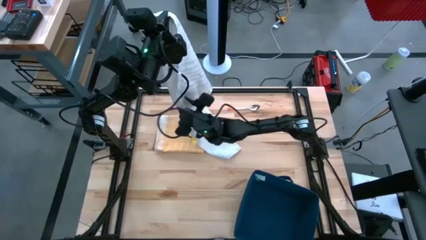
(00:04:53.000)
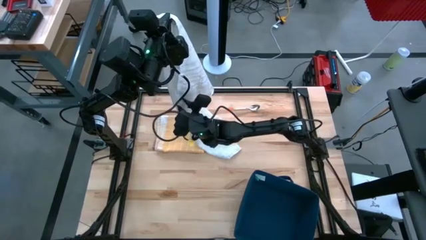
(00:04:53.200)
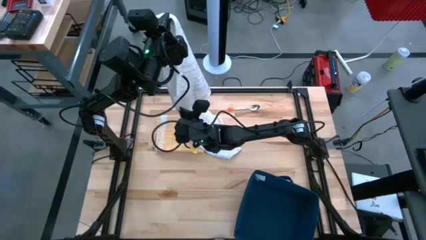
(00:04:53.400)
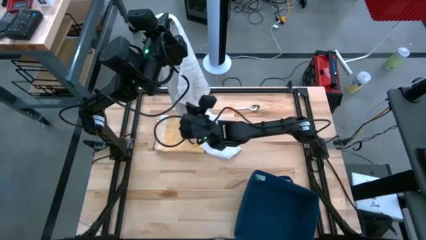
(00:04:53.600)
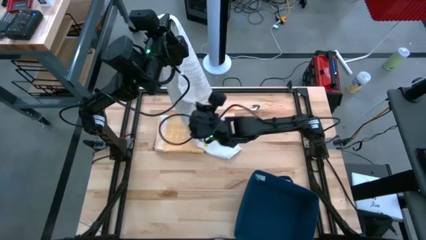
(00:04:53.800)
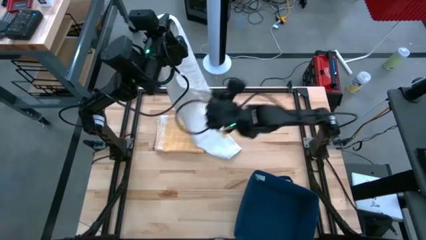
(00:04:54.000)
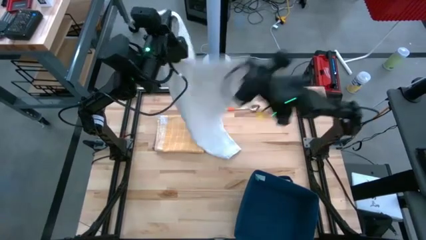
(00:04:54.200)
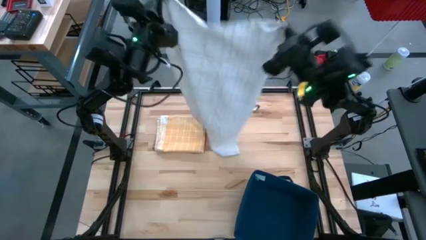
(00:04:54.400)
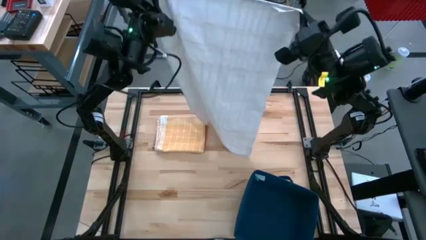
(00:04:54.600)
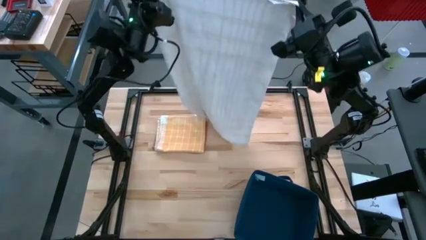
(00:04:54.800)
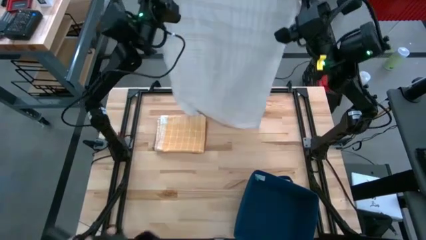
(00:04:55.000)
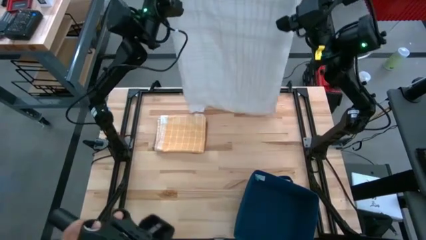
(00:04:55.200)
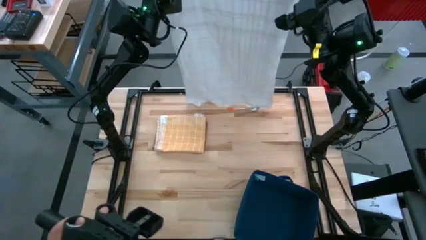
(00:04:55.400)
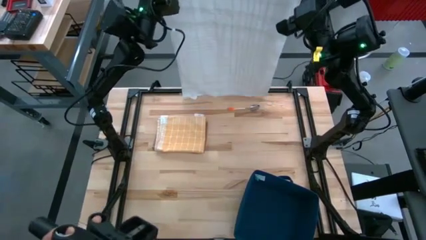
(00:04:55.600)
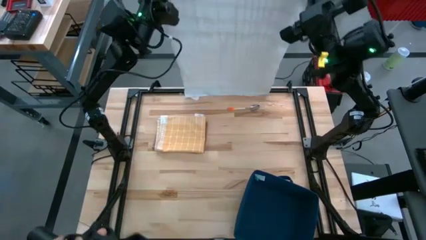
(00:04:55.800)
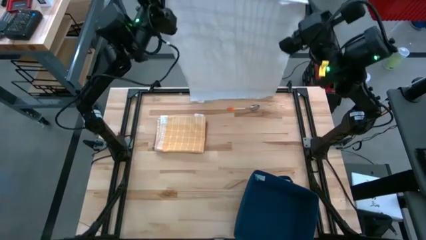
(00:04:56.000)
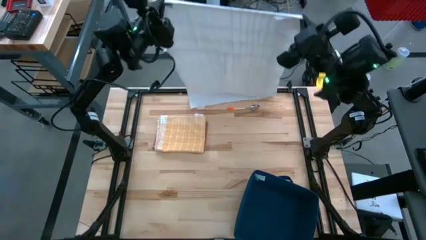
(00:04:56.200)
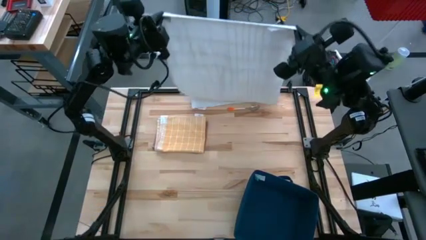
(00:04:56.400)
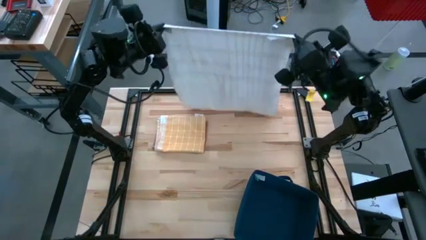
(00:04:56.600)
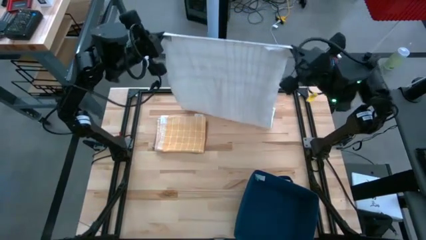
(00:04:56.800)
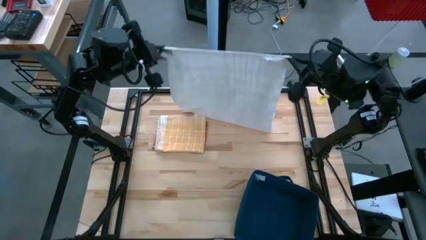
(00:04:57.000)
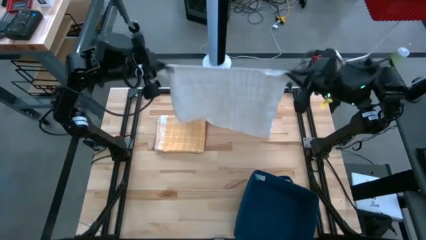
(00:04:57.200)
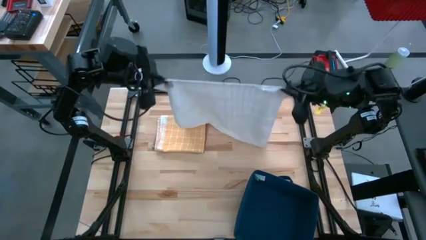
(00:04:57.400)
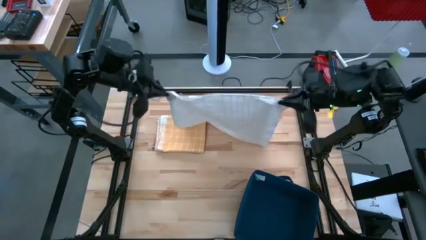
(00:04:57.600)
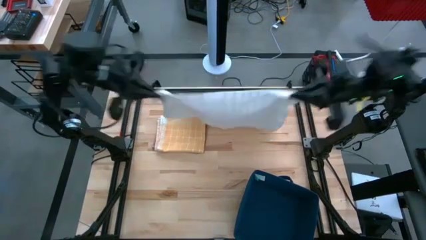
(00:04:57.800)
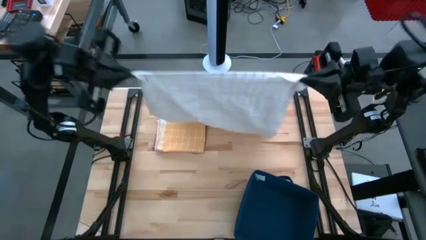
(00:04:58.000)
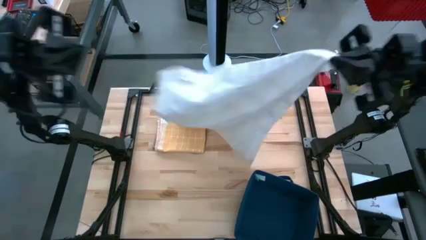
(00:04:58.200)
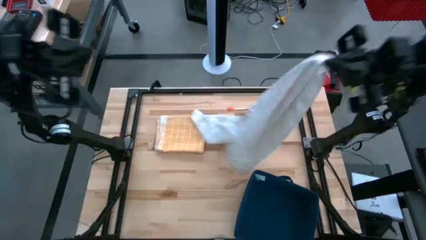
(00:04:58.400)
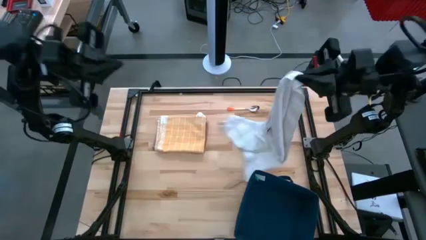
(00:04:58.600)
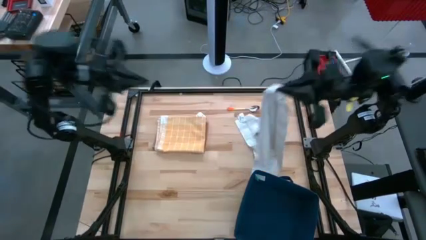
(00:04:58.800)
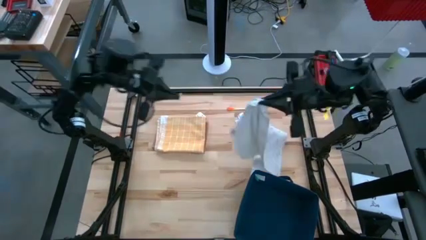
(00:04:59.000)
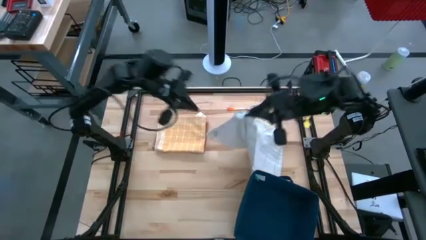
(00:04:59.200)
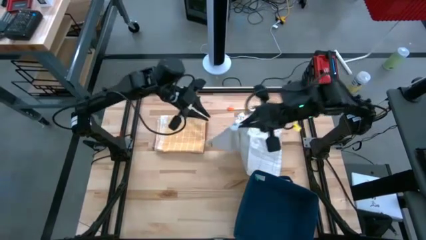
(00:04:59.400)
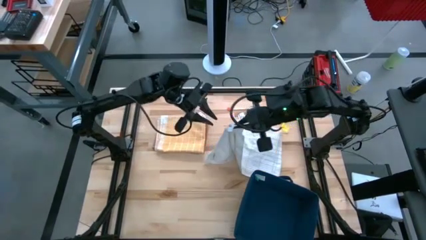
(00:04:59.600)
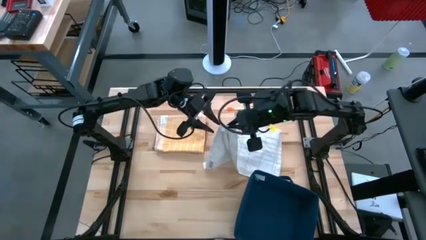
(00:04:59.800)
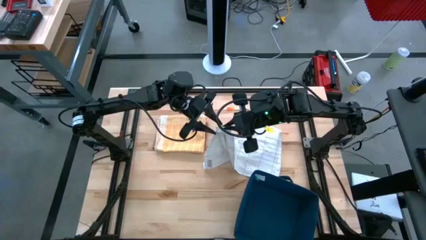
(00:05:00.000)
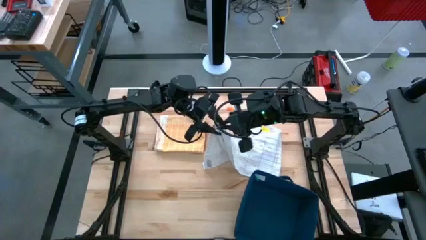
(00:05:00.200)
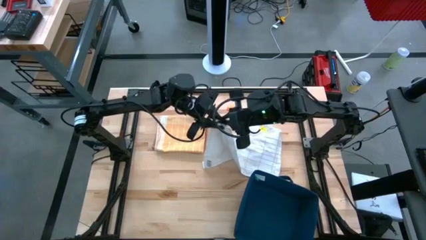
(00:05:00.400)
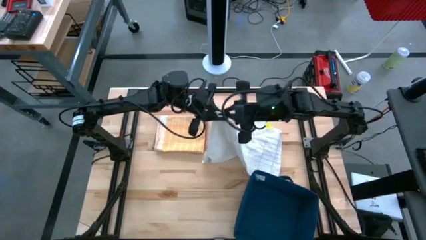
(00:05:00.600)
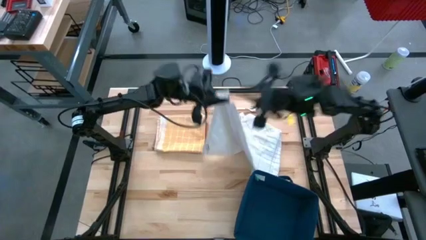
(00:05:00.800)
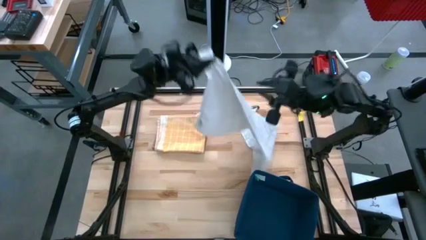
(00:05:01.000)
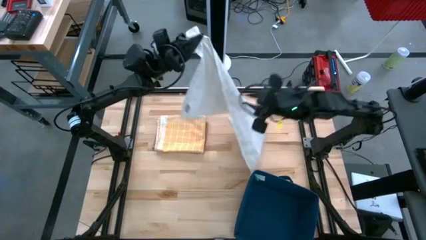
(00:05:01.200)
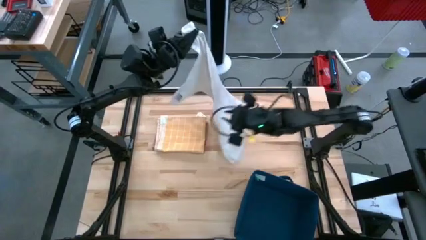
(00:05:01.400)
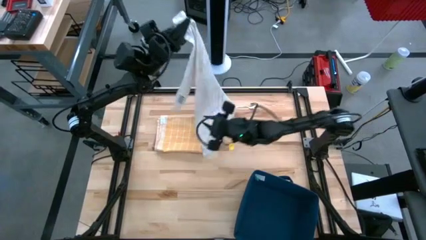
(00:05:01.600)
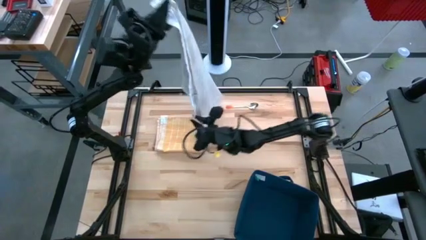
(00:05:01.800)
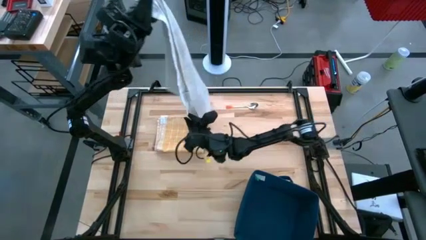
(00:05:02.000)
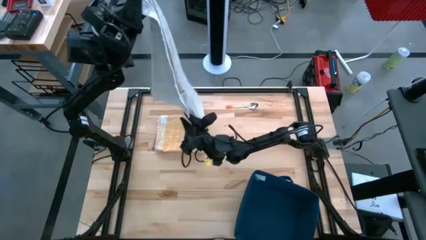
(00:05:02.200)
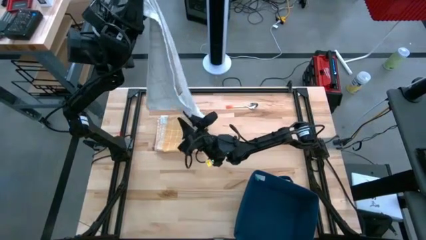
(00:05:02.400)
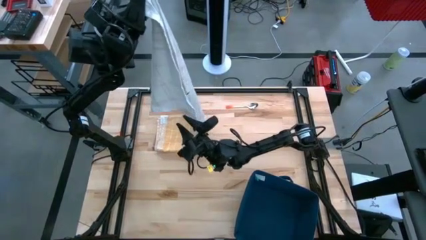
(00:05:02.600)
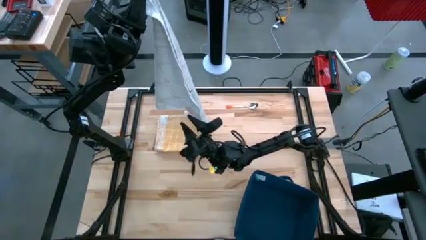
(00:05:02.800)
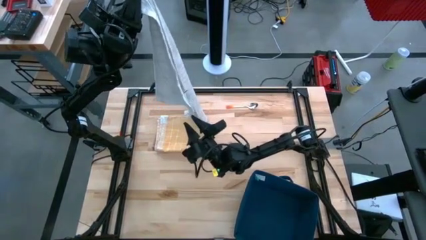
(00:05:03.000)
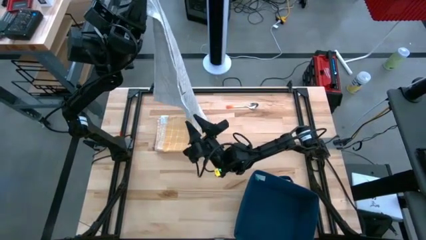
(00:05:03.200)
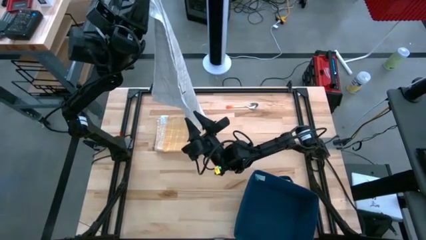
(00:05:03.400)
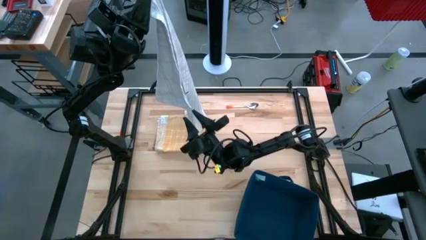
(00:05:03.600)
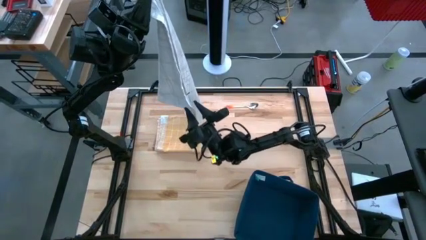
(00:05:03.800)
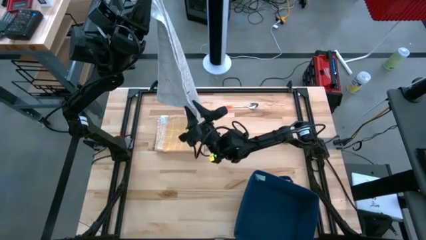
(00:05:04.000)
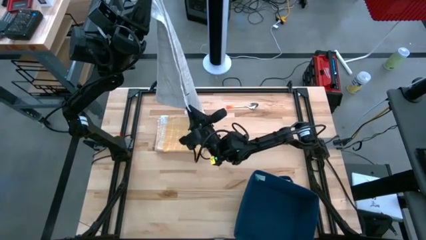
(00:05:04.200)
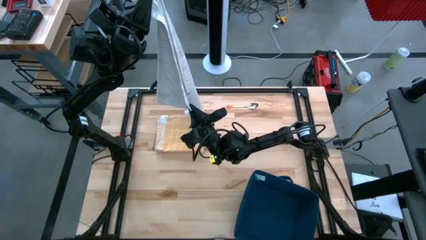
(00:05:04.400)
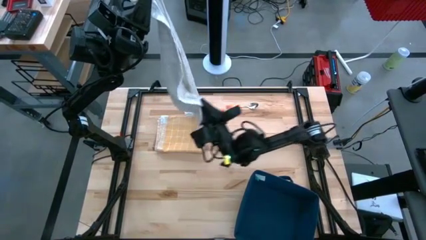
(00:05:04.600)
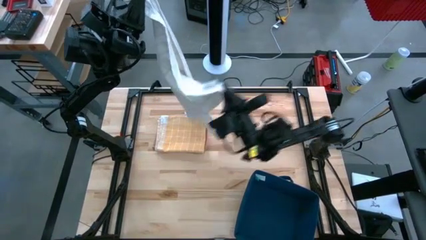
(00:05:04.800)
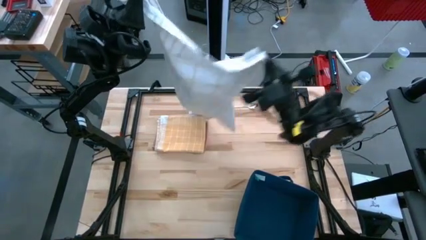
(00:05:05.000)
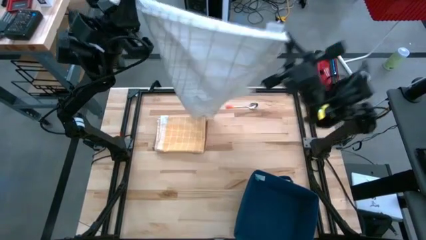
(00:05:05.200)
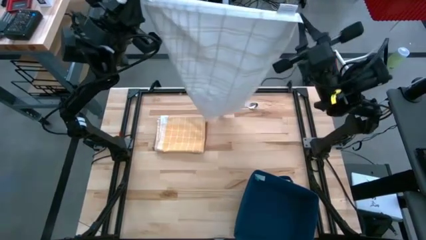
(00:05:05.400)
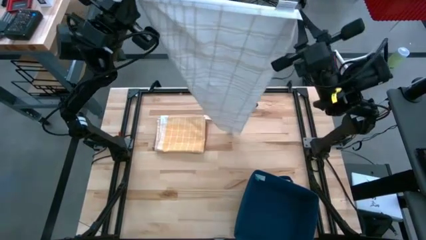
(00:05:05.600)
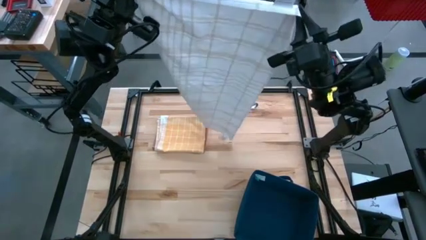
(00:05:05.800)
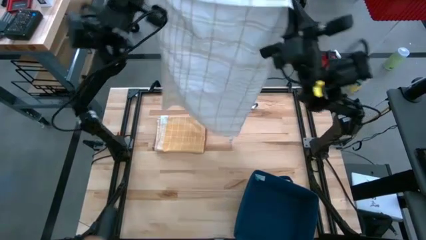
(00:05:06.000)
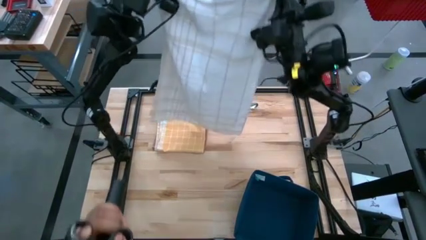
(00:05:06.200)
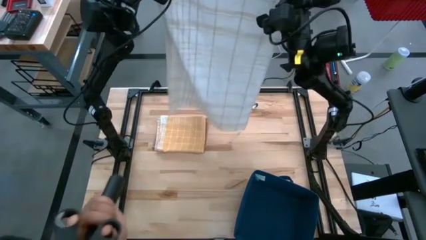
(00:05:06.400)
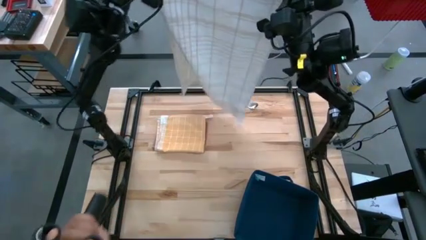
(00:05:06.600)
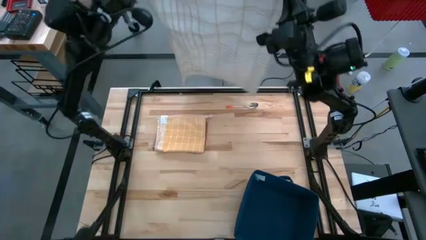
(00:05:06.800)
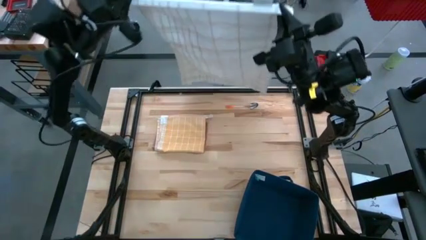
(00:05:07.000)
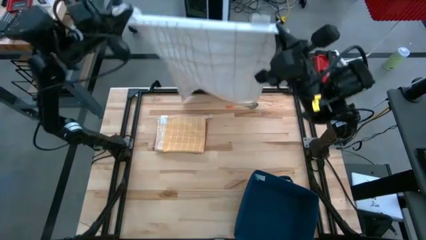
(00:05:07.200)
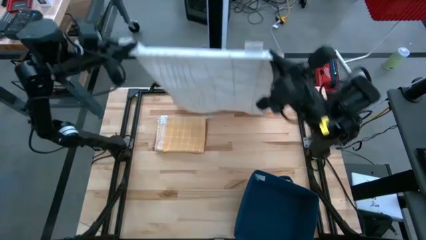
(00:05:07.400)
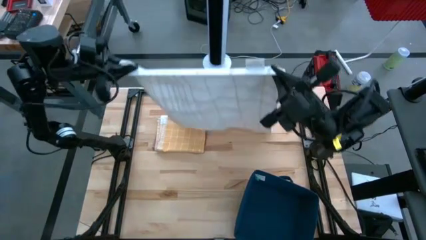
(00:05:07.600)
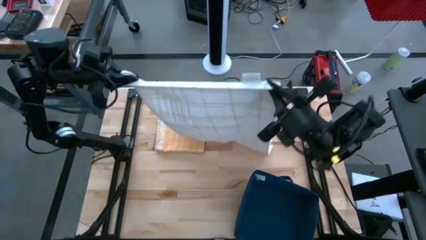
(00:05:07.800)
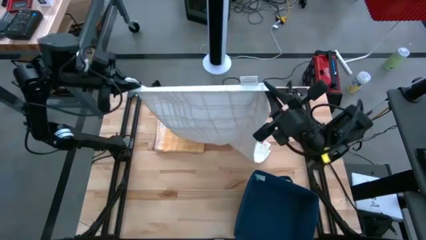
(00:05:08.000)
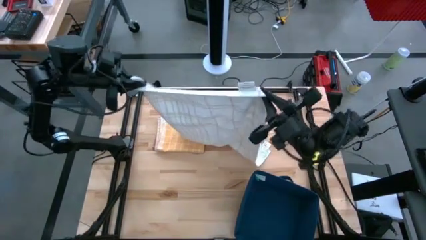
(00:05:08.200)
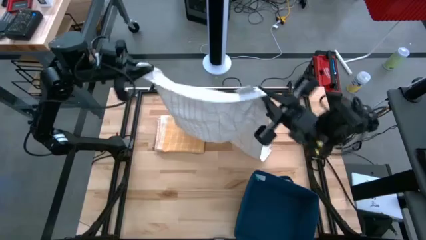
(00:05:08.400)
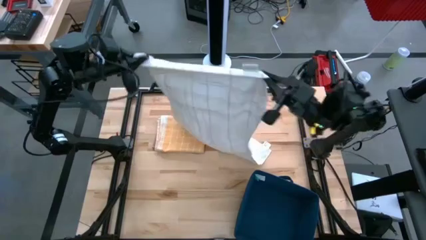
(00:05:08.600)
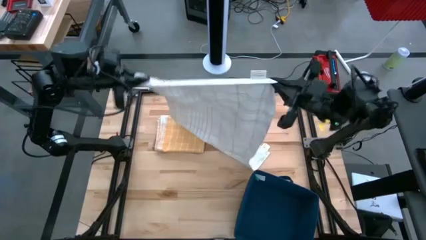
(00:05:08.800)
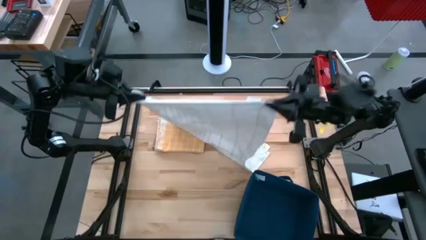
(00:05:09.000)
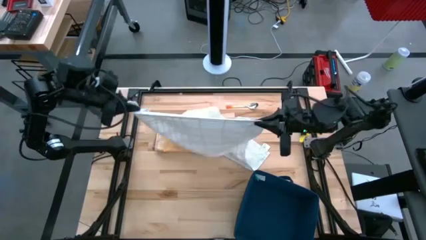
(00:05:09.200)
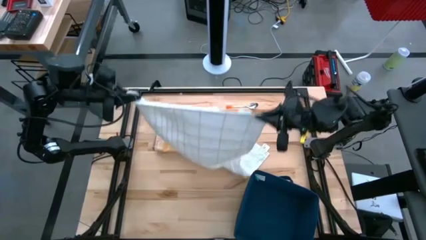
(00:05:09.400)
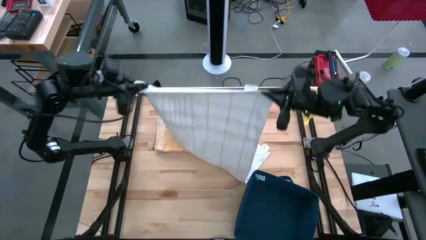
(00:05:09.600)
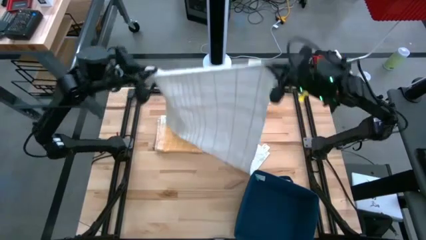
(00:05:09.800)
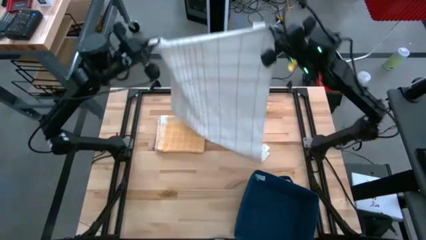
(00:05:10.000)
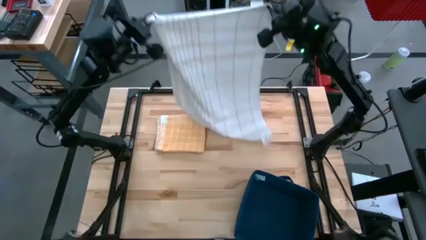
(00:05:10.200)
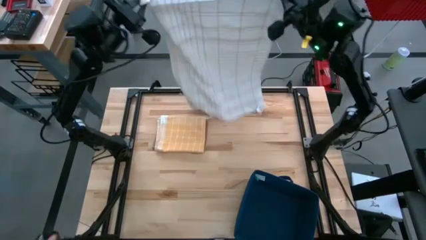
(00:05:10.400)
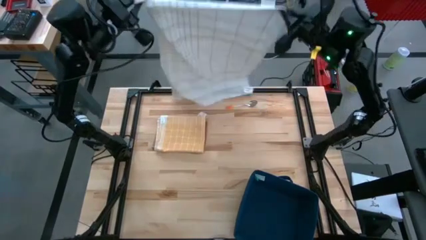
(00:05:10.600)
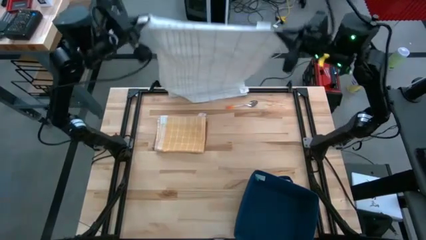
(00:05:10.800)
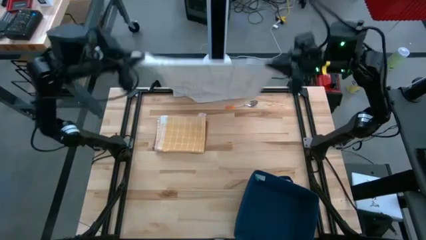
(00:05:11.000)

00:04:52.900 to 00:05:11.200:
Task: Fold towel
Fold the white towel
